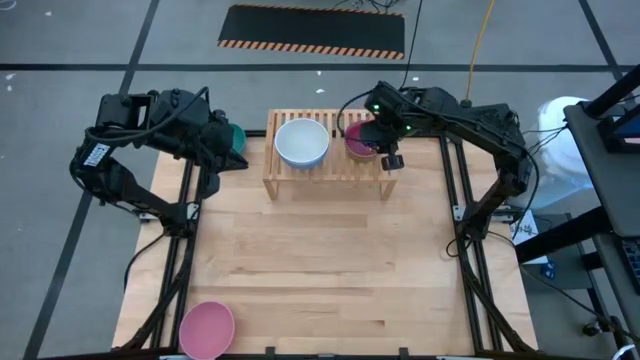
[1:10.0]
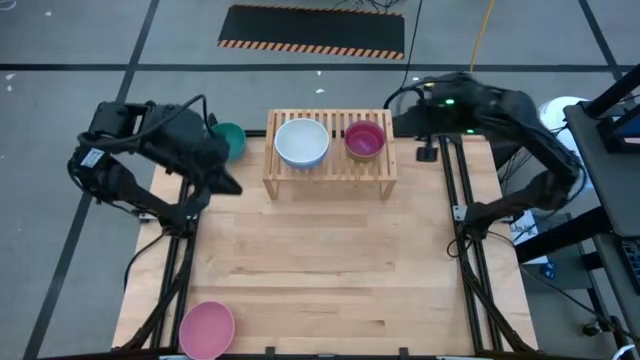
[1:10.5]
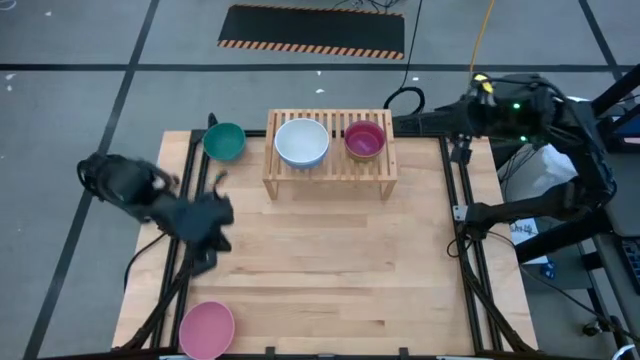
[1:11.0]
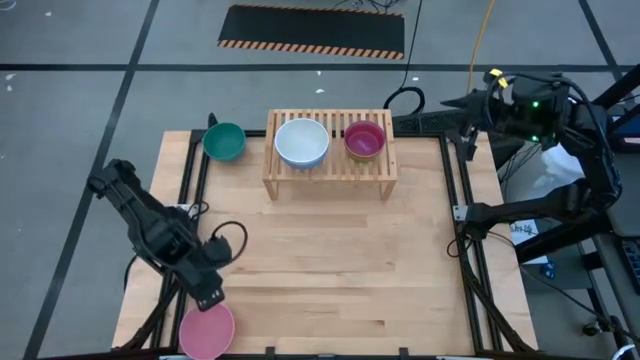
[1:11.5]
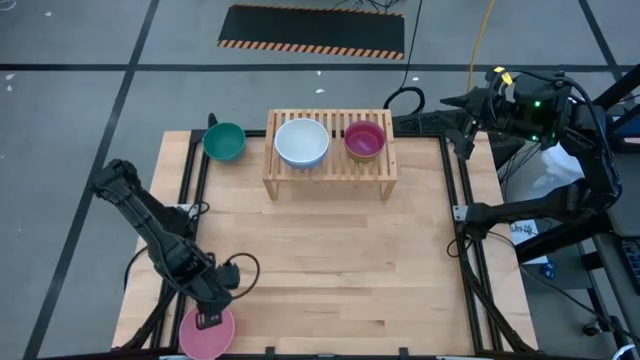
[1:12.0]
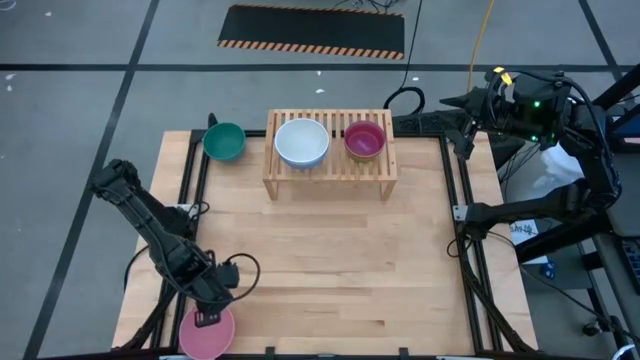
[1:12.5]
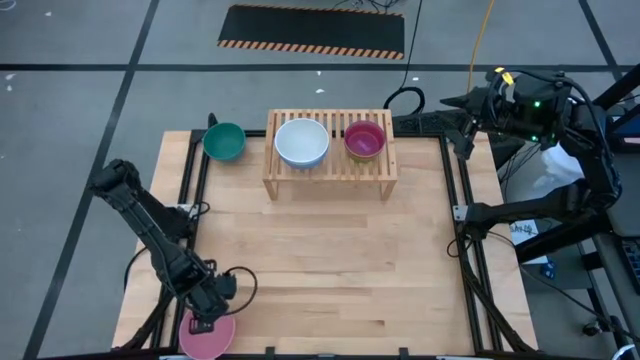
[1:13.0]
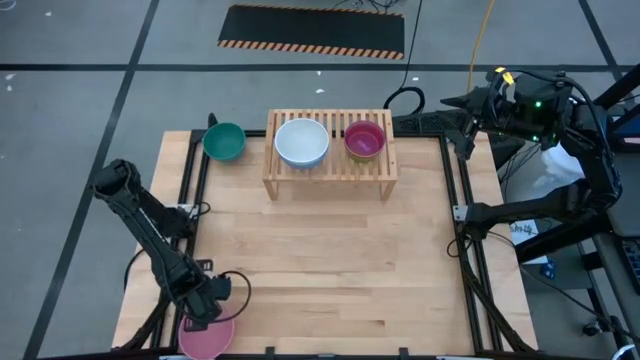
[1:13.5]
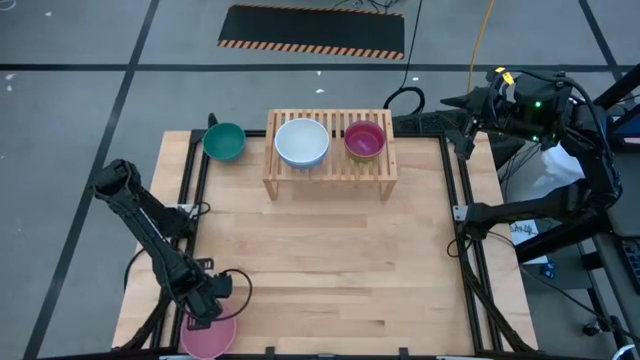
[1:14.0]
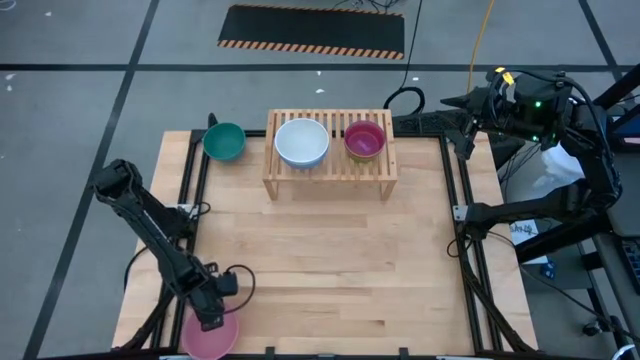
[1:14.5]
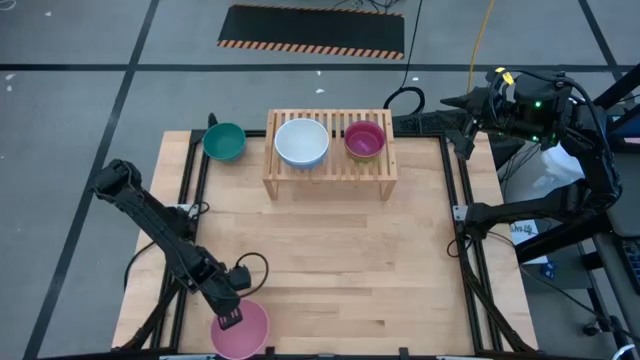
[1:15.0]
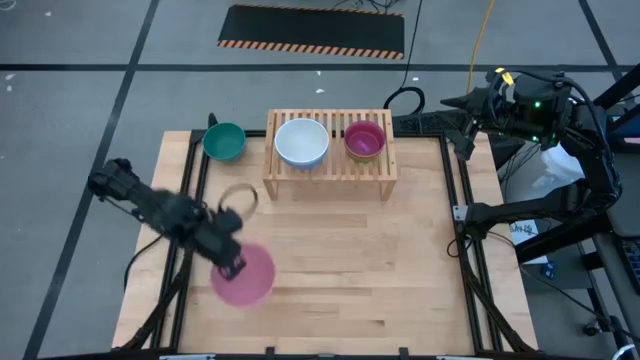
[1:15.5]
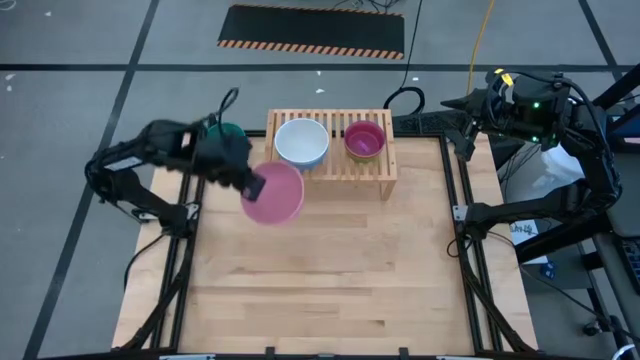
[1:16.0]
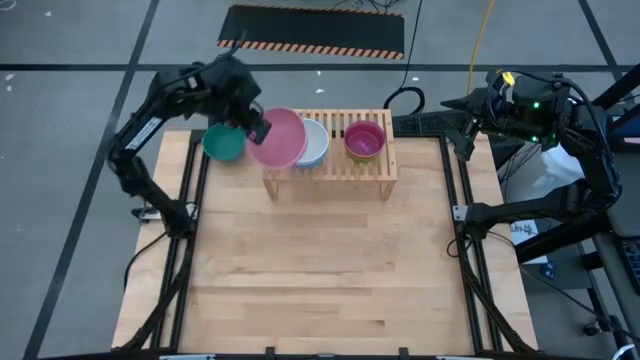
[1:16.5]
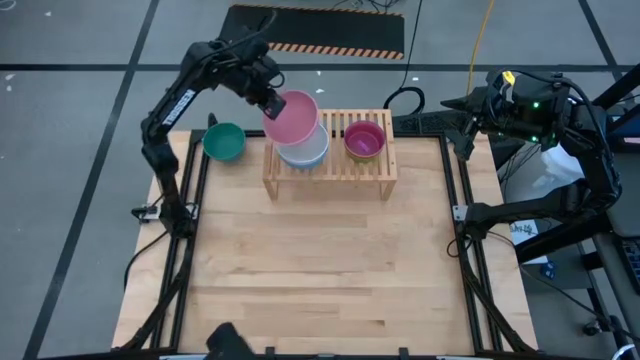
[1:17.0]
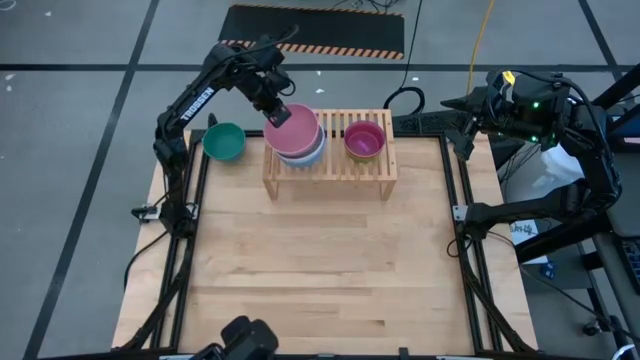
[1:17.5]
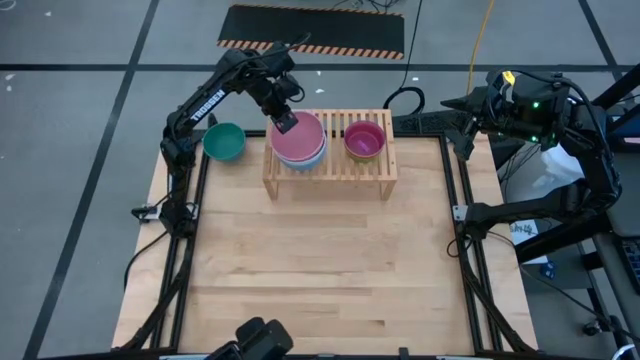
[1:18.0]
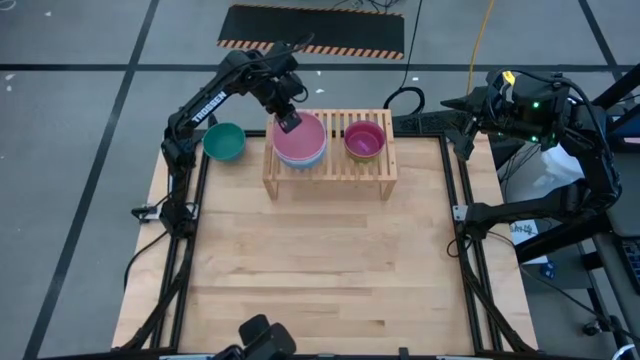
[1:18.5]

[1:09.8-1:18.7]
Task: Place and stack bowls onto a shelf
Stack the pink bowl on top of the white bowl on the shelf

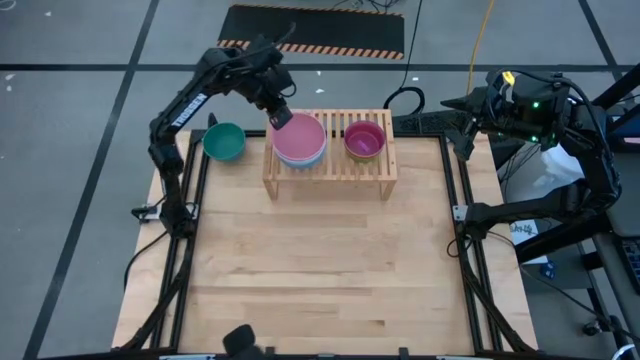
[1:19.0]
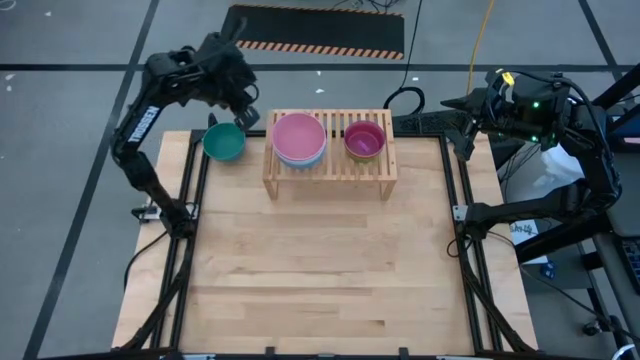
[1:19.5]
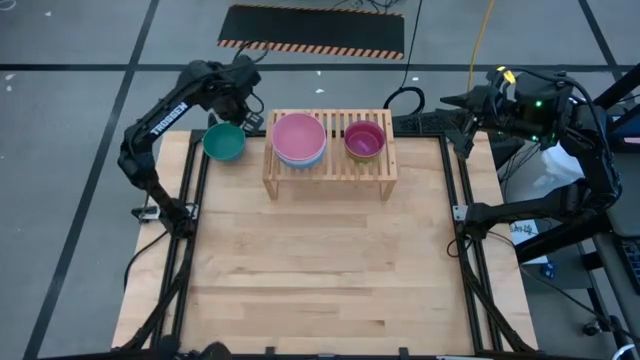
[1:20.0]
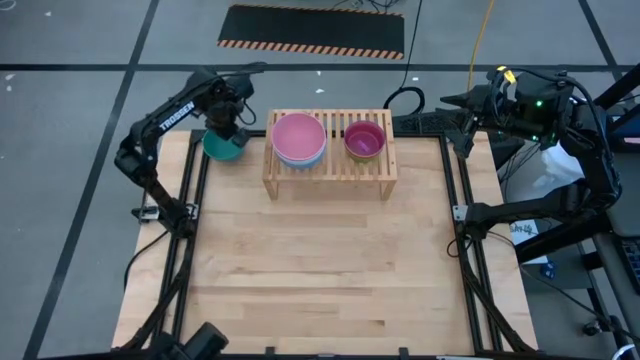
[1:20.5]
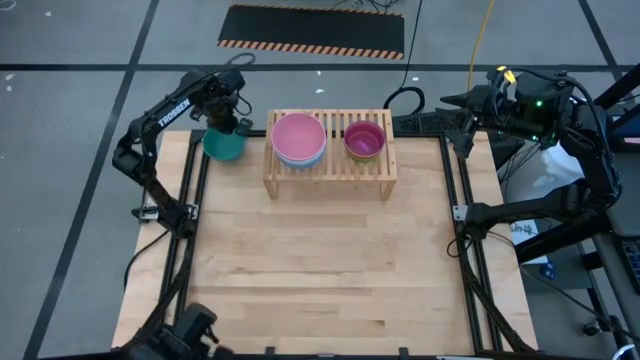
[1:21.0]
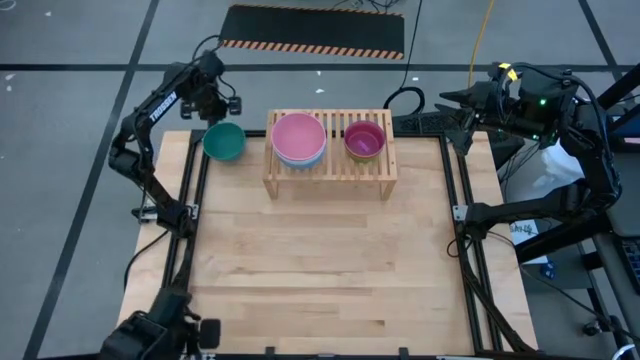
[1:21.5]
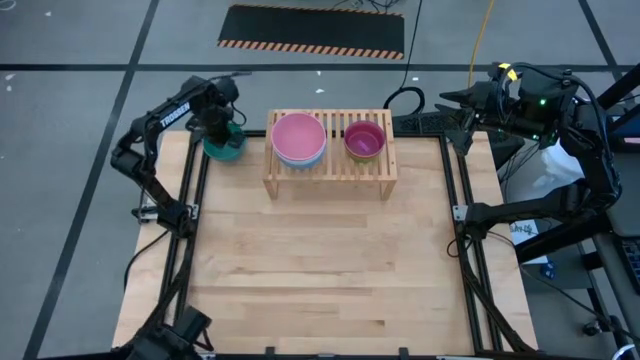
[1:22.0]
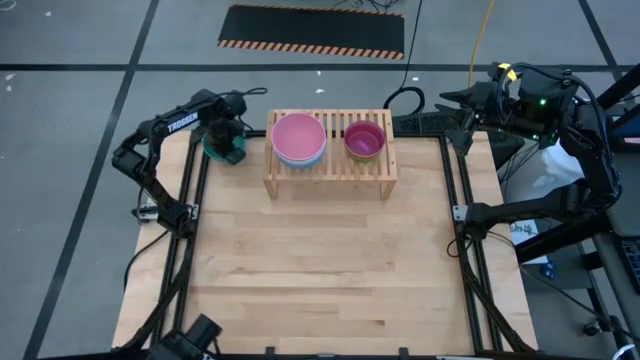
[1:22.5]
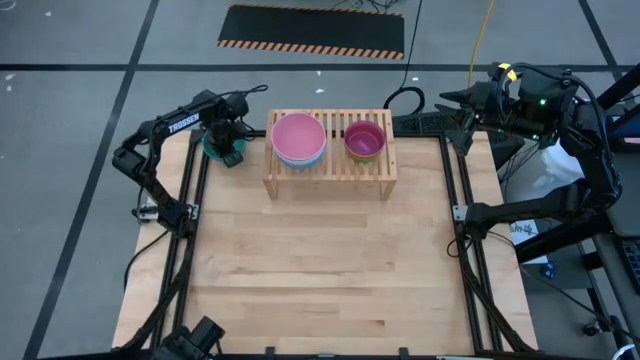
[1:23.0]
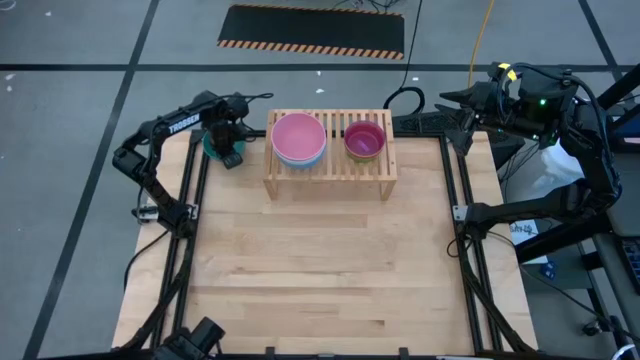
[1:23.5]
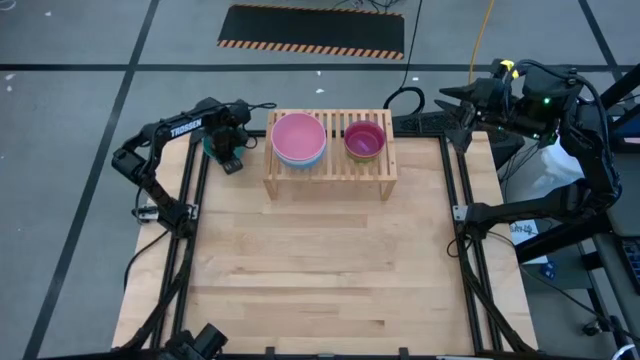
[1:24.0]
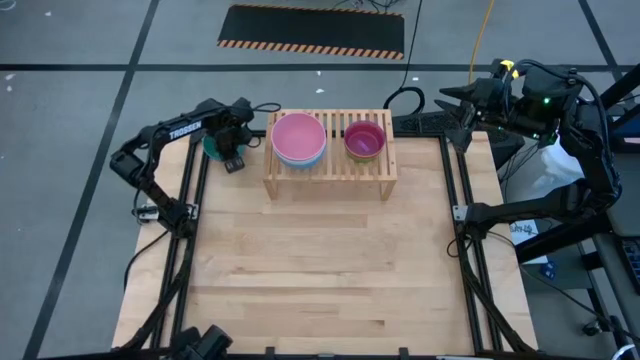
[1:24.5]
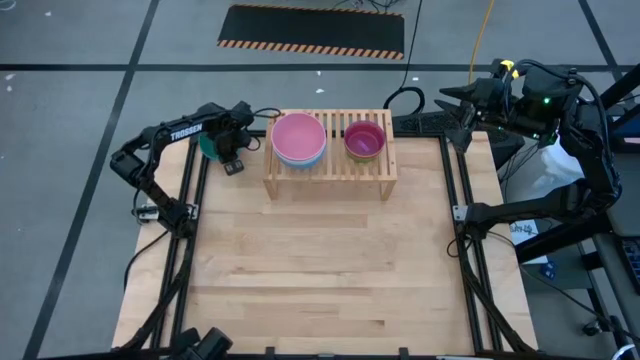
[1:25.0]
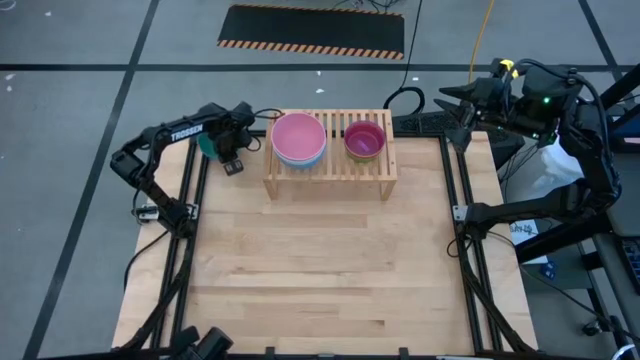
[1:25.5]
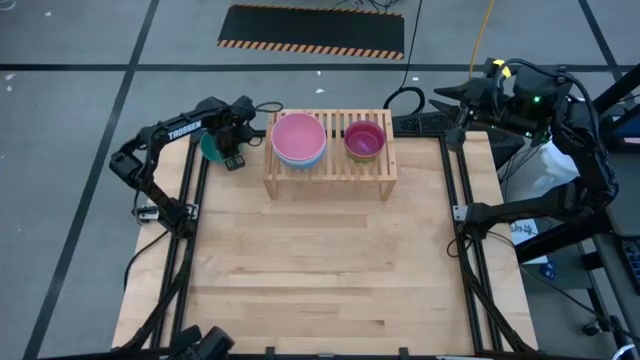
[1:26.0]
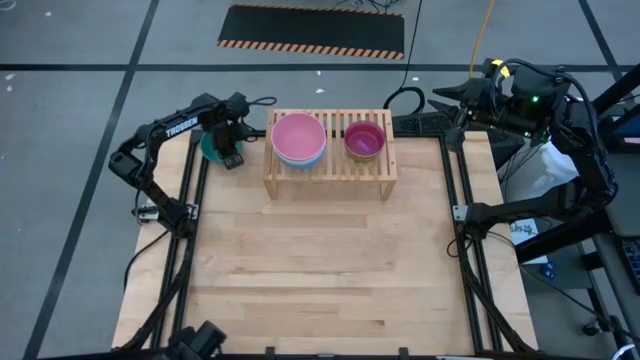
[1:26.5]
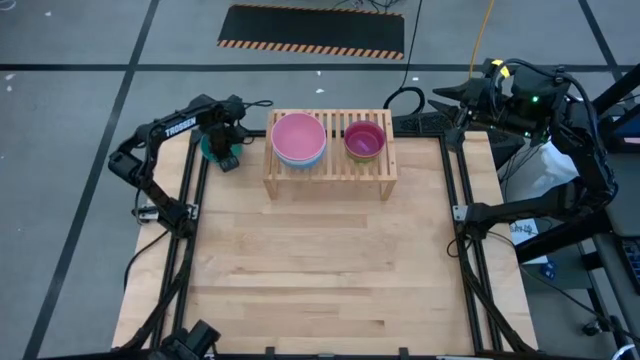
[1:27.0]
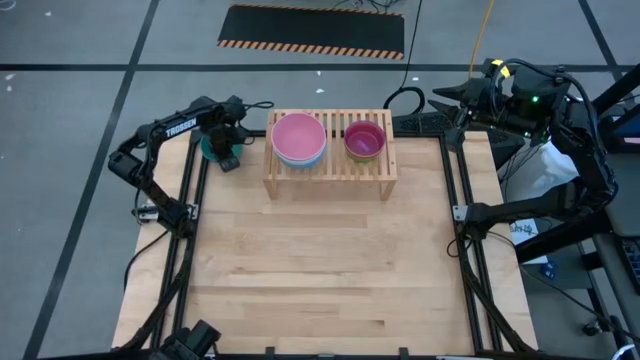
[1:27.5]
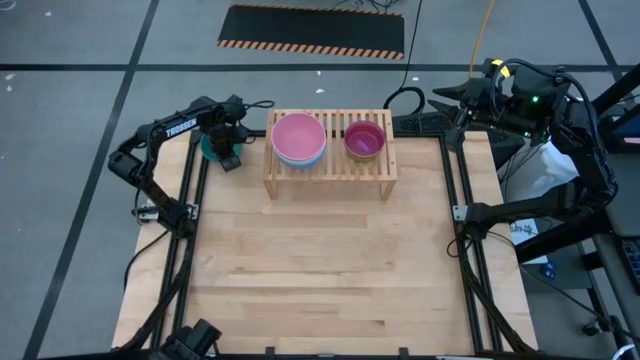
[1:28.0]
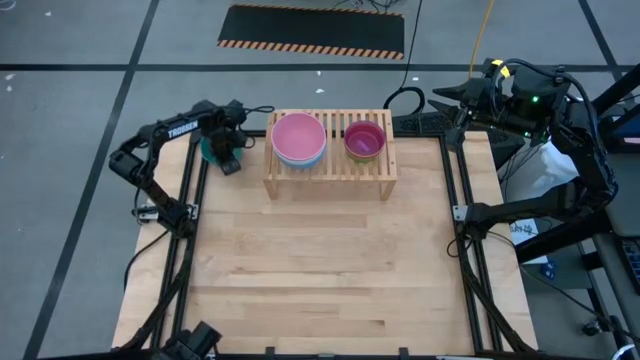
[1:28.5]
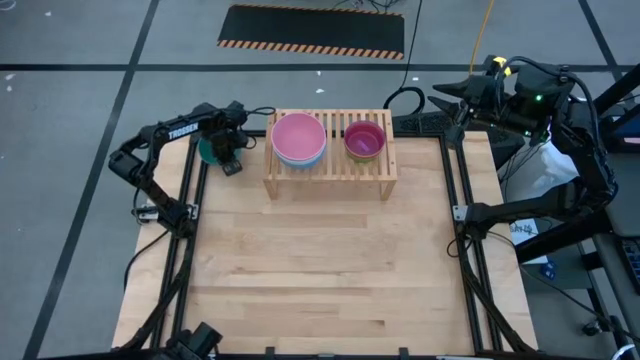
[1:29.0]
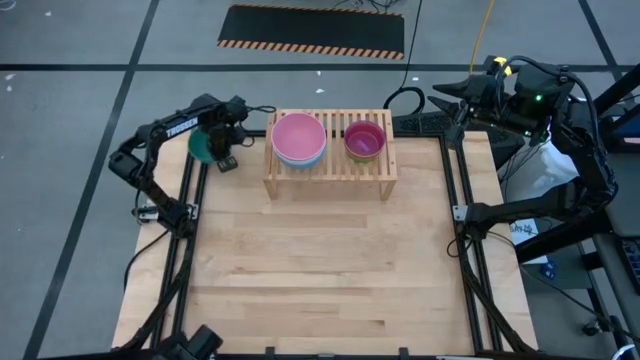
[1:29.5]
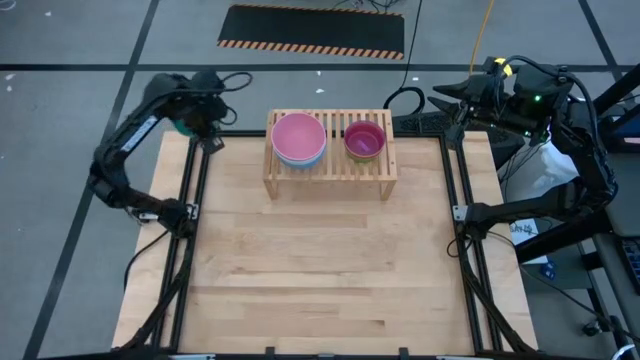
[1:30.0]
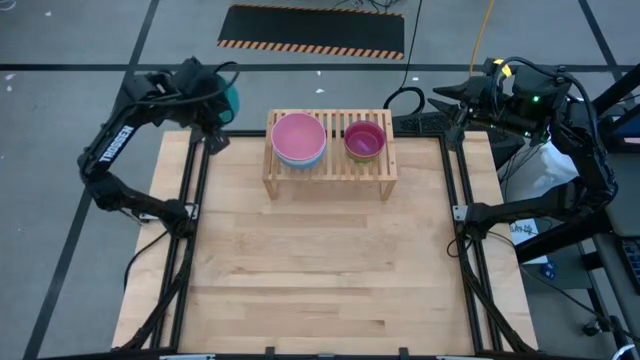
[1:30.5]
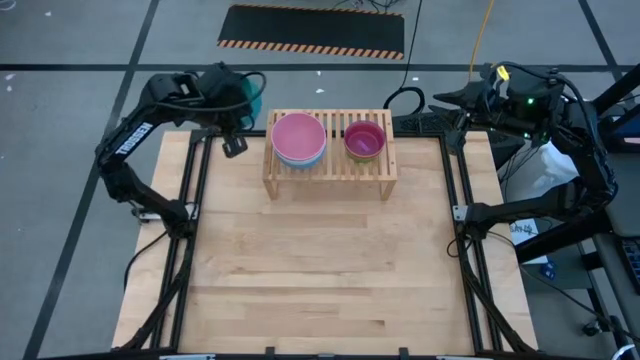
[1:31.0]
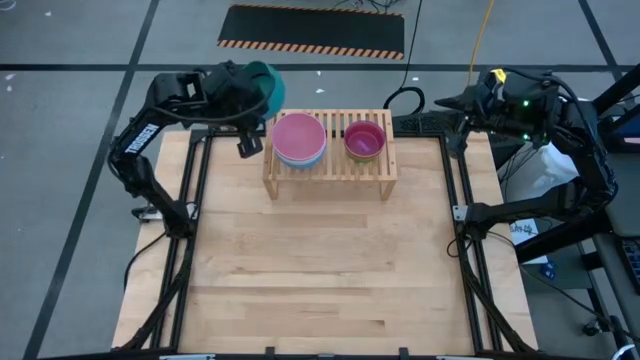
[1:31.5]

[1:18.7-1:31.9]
Stack the dark green bowl on top of the pink bowl on the shelf
